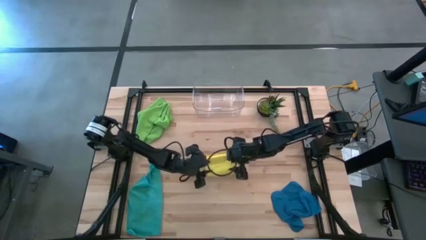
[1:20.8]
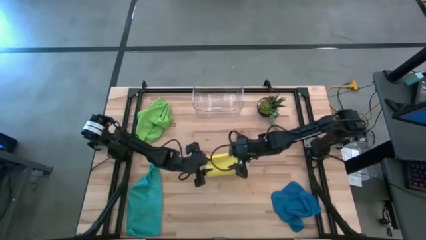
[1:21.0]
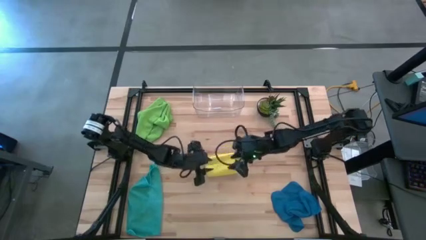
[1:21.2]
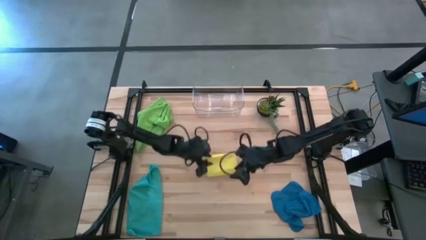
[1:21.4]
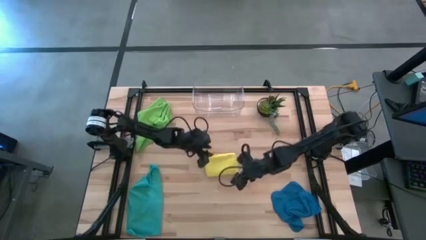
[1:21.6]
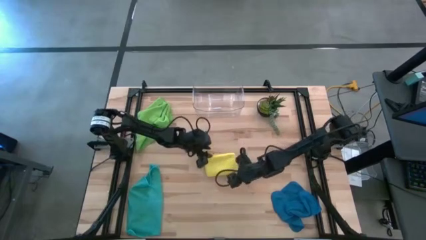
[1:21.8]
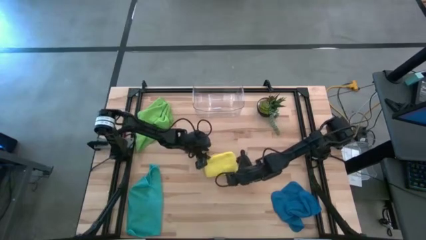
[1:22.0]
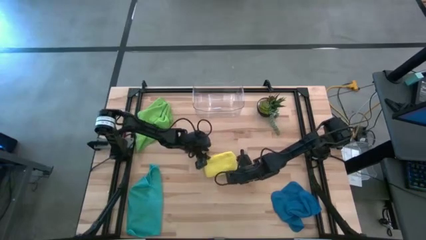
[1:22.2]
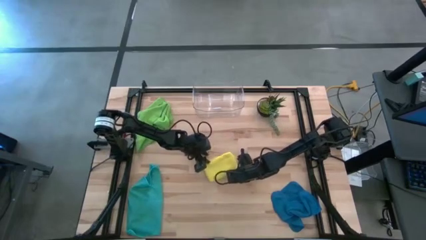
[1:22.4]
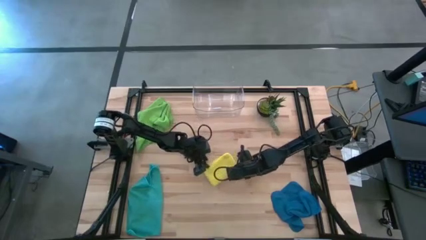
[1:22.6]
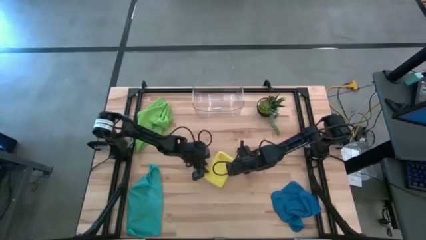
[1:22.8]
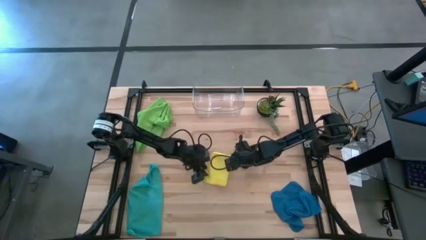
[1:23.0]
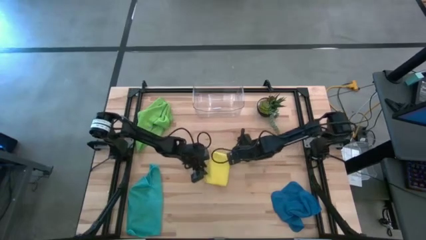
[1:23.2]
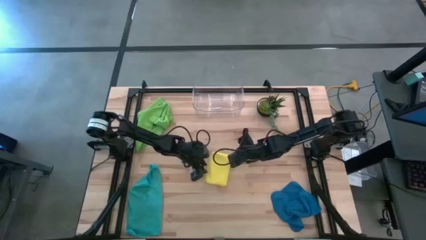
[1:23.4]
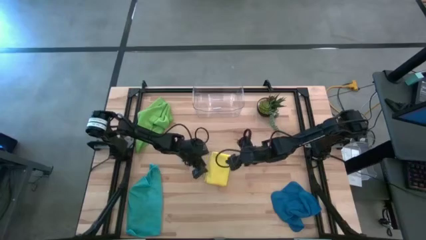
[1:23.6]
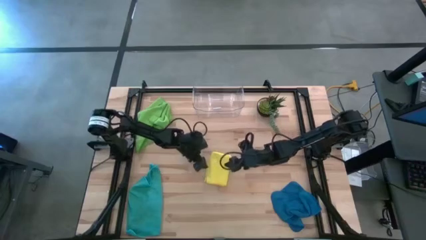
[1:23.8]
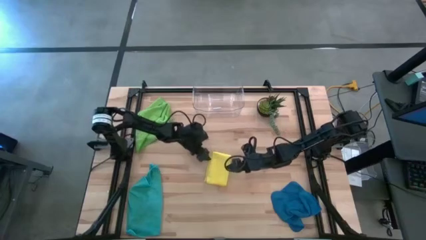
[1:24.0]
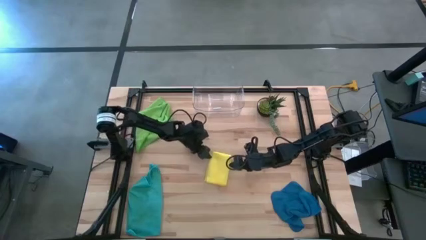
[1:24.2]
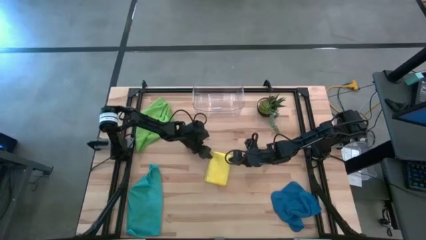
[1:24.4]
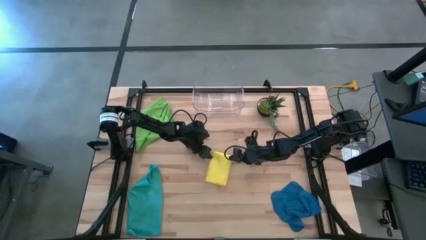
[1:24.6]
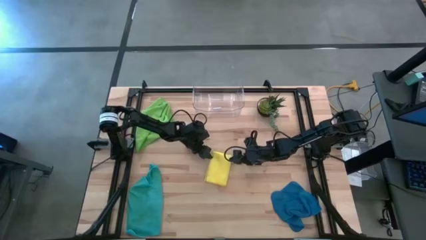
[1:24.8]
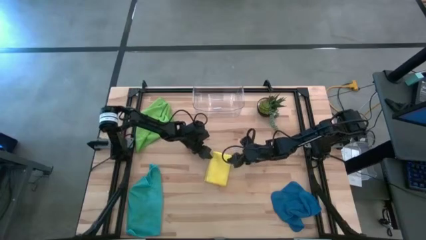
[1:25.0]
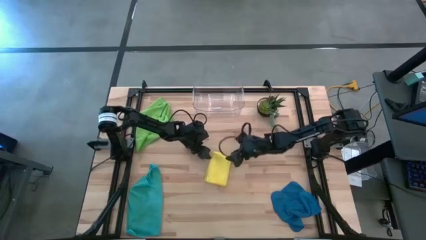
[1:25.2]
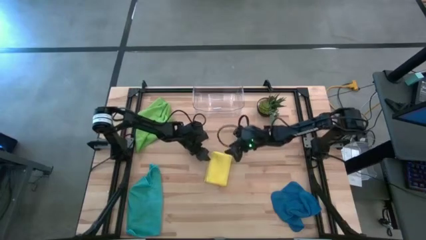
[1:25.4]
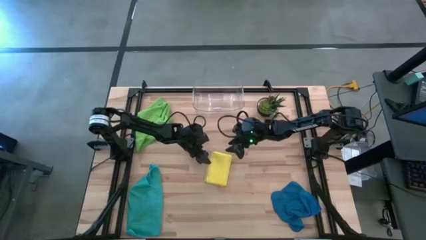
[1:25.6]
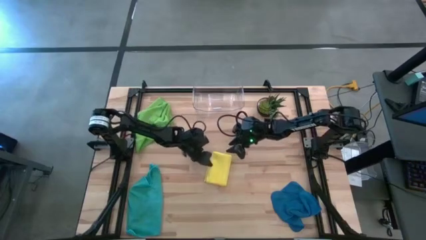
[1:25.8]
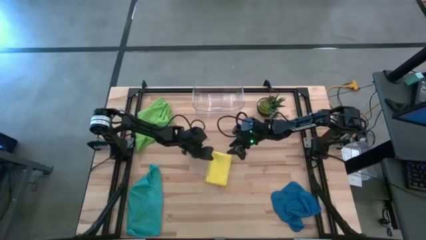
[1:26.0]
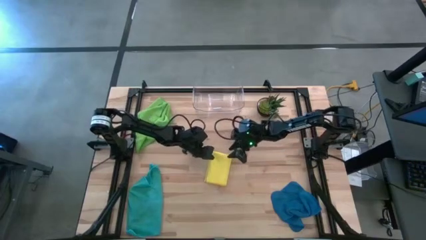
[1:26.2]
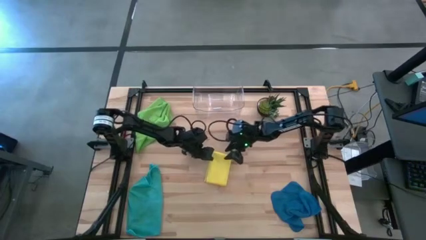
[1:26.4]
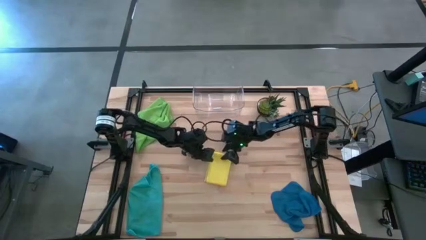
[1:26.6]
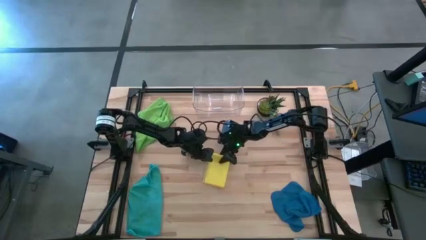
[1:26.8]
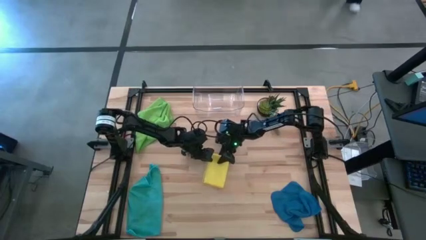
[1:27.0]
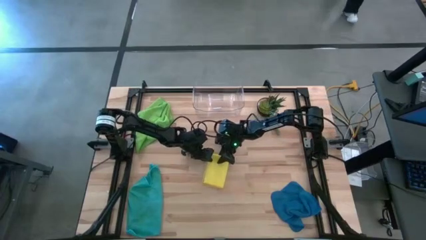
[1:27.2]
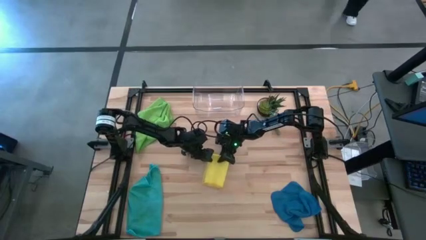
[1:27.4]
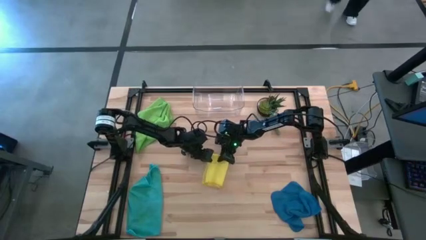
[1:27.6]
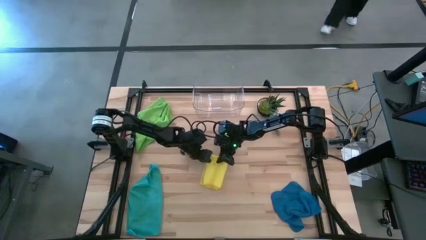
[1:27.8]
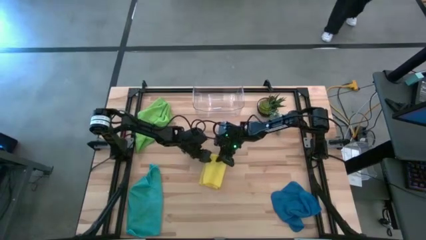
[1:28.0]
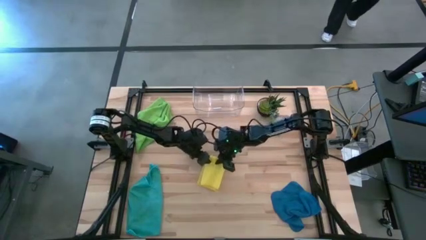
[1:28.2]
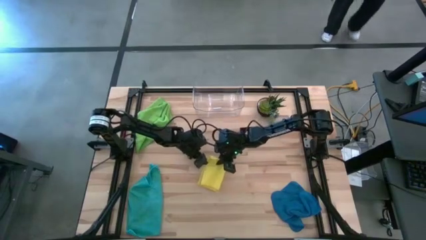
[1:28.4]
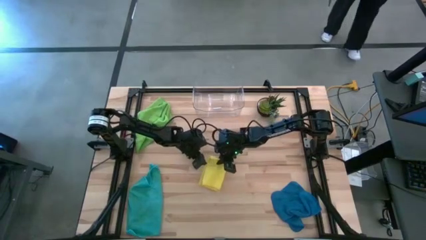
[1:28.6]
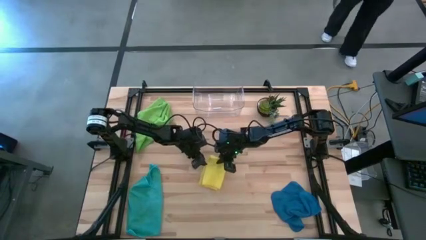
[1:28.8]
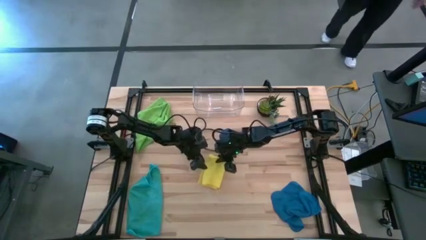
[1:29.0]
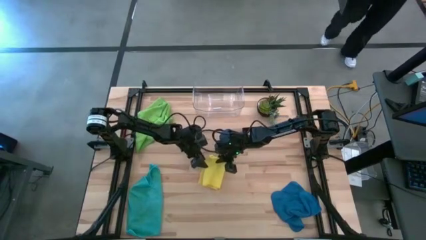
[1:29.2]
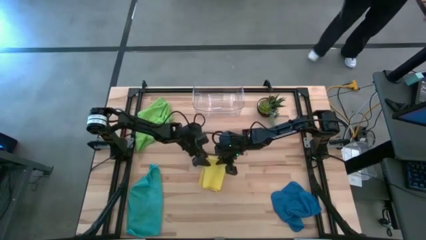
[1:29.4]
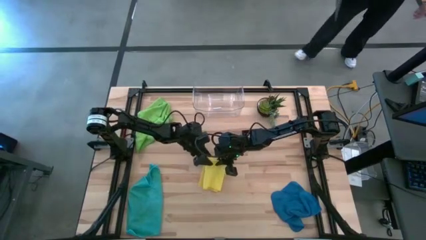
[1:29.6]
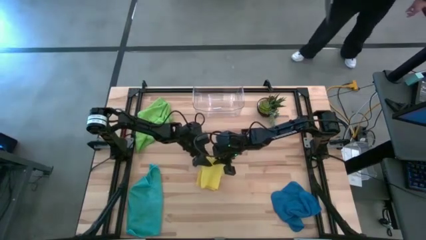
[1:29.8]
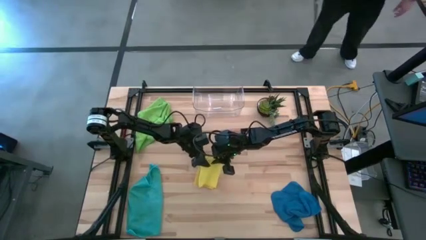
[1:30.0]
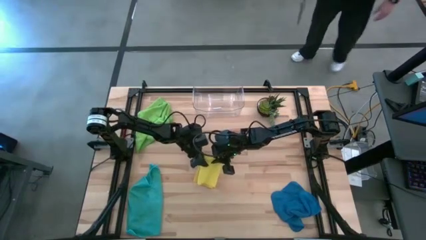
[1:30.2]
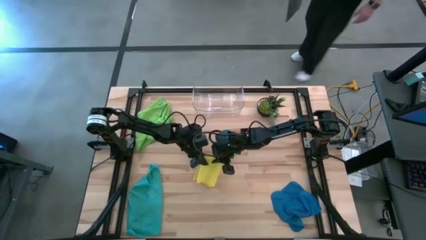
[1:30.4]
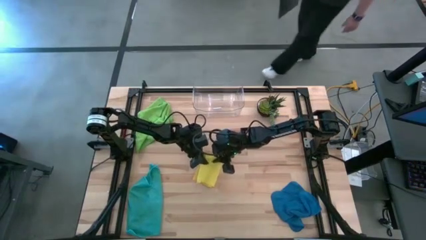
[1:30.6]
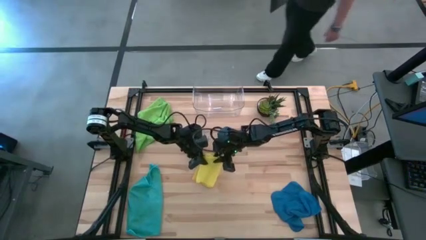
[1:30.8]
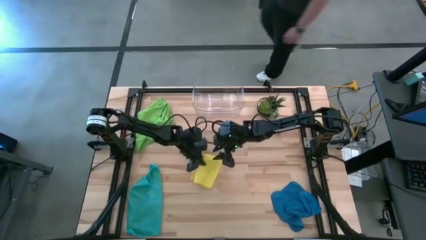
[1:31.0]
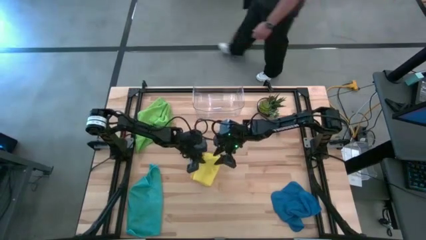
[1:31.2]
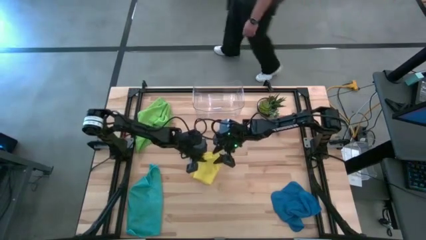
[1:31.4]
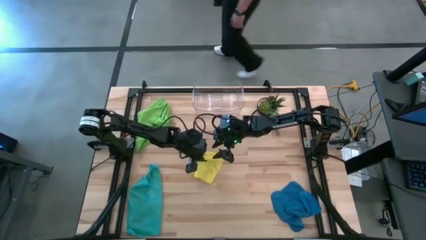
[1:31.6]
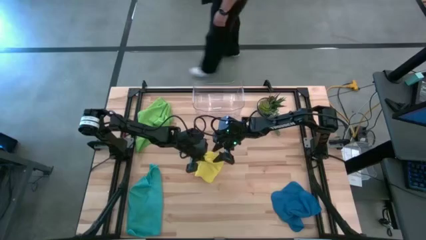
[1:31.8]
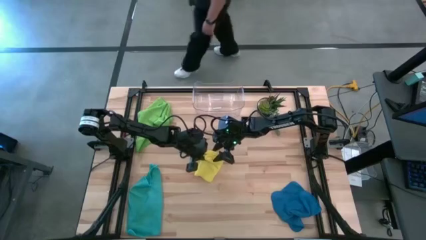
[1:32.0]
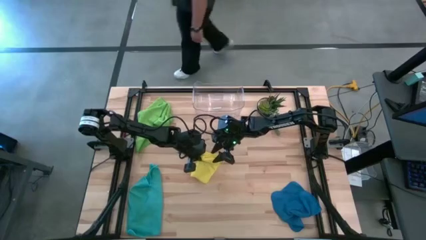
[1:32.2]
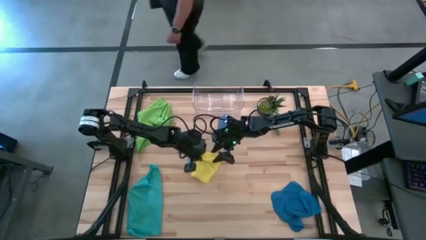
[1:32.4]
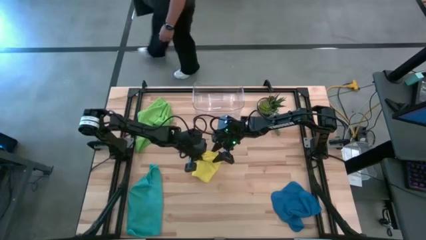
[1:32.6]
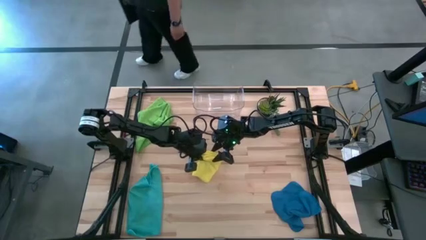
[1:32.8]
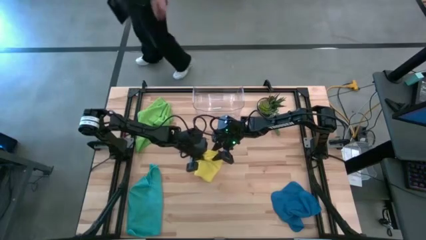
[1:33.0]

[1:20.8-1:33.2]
Task: Fold microfiber towels
Put the yellow microfiber towel into the transparent bin

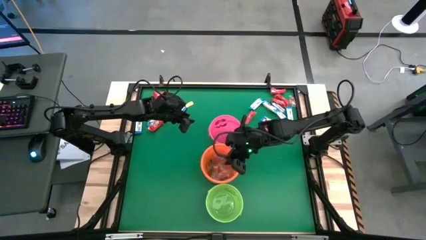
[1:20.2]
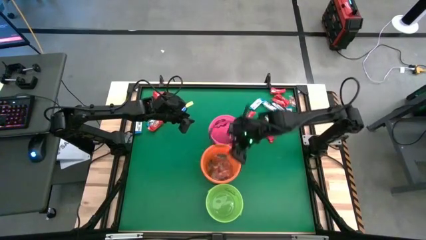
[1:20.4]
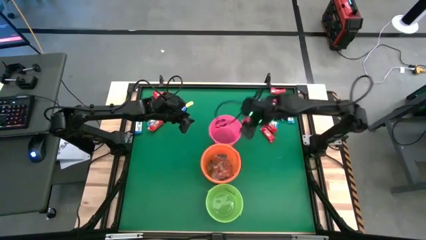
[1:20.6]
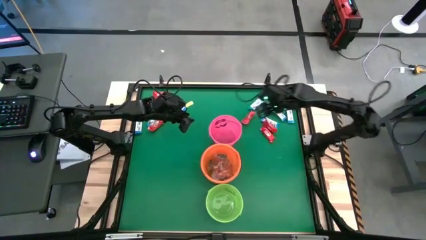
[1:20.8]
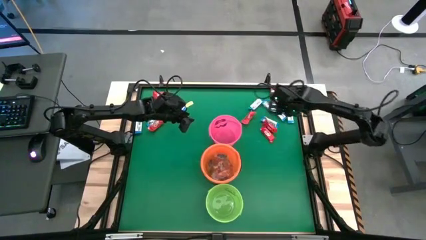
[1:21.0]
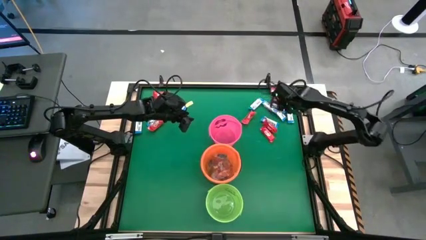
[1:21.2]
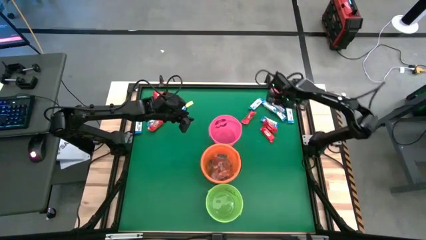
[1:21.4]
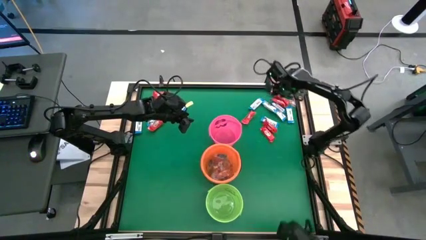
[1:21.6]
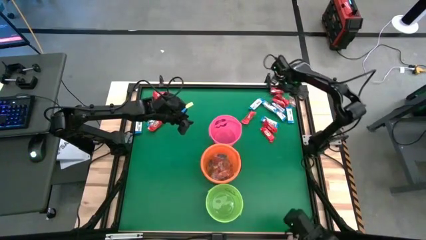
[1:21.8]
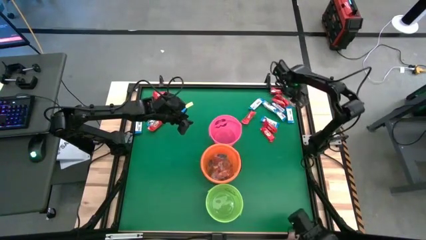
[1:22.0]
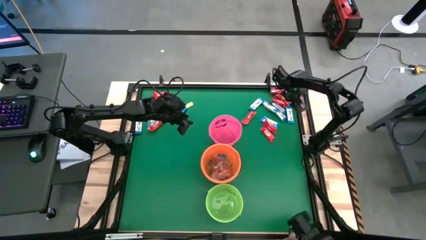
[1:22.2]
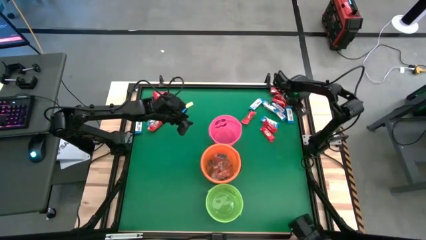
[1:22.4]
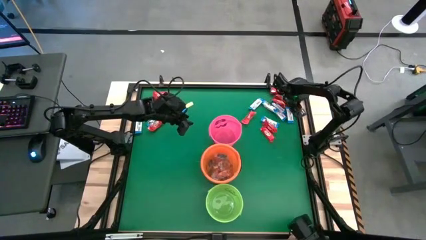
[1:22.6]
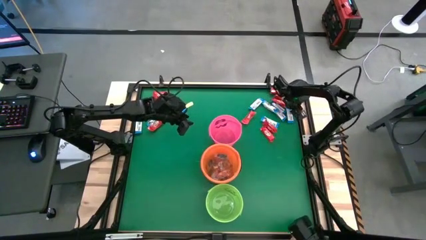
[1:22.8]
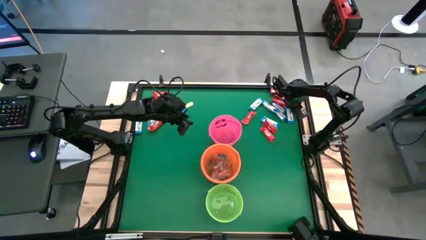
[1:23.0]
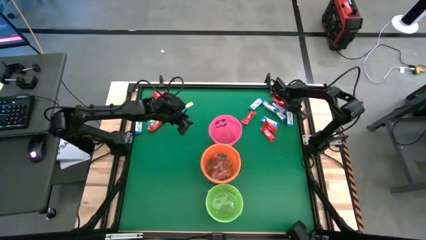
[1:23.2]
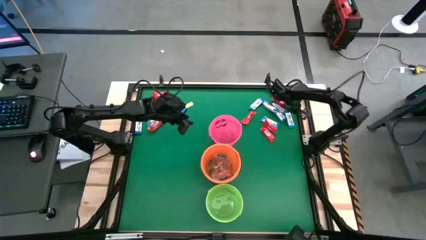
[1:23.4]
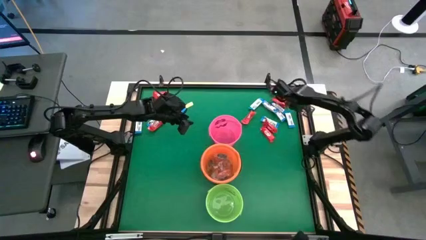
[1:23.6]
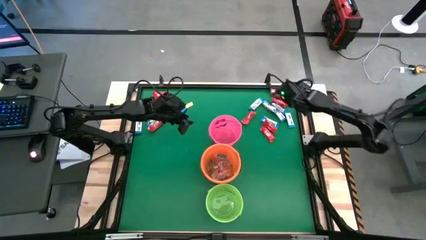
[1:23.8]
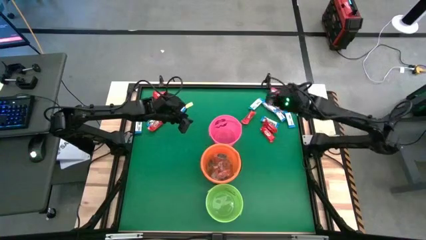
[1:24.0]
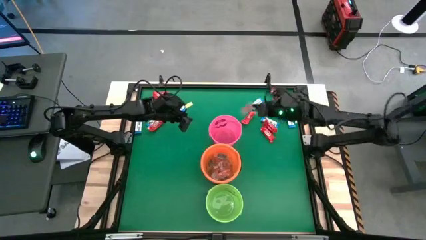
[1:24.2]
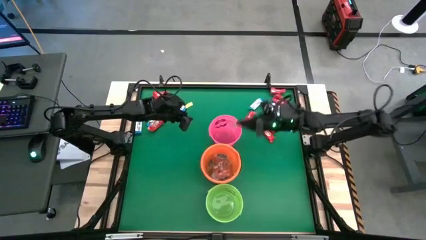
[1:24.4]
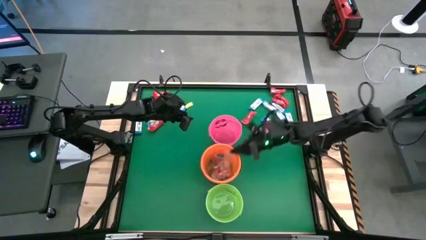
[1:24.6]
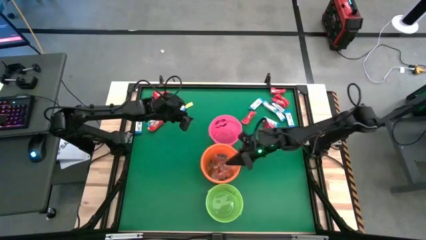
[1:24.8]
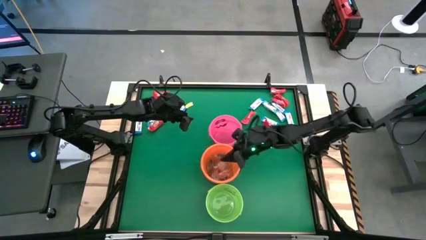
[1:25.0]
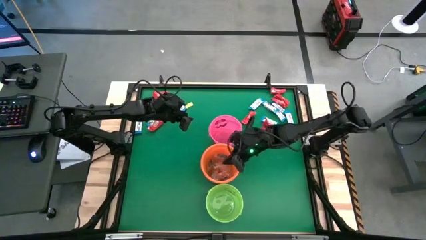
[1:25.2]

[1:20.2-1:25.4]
Task: Sort candy by brand, put in halloween buckets
Put the orange gummy into the orange bucket
